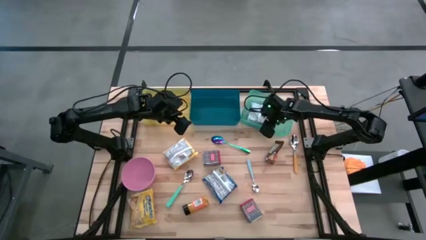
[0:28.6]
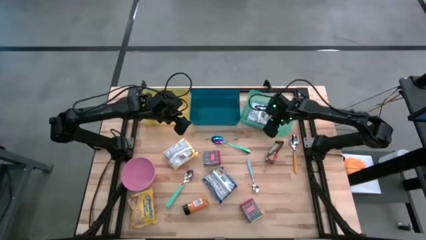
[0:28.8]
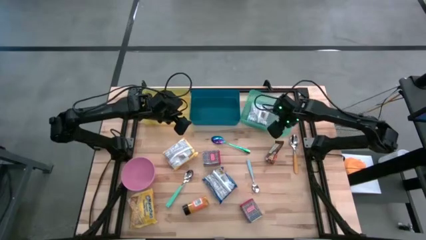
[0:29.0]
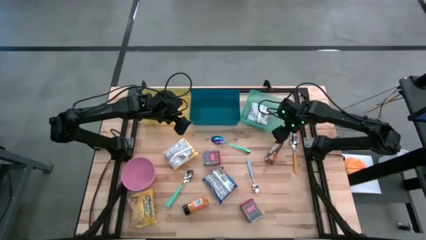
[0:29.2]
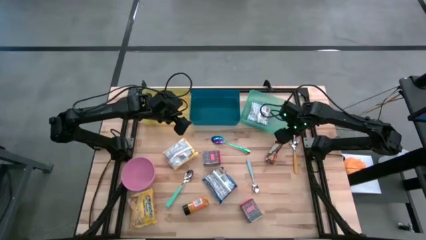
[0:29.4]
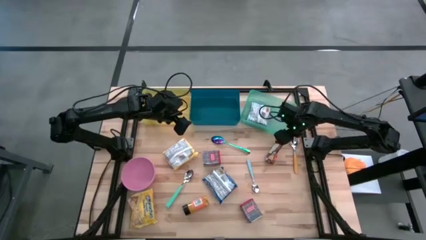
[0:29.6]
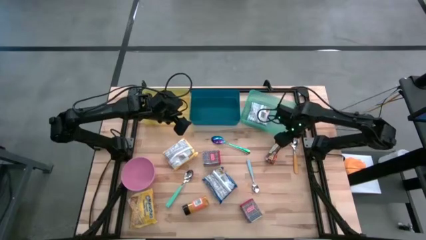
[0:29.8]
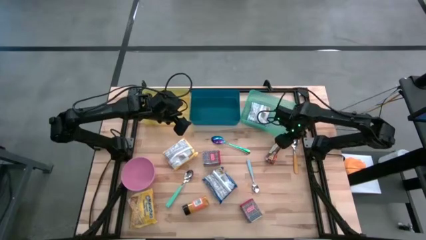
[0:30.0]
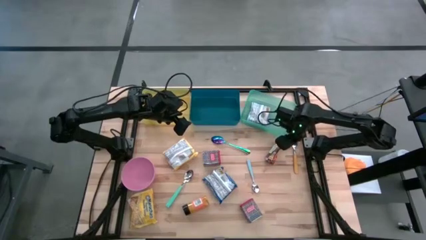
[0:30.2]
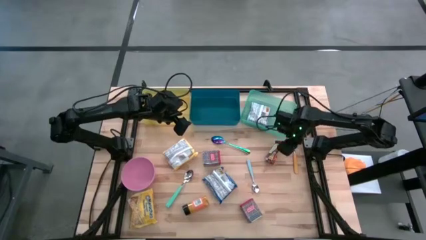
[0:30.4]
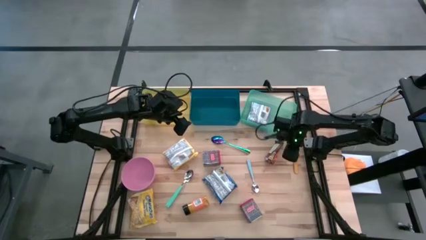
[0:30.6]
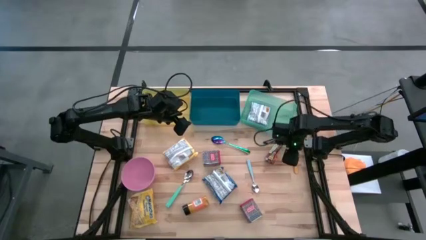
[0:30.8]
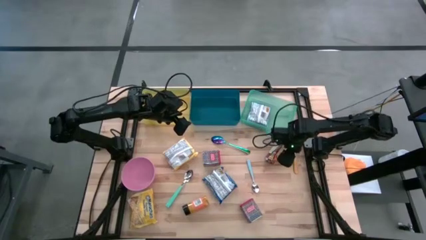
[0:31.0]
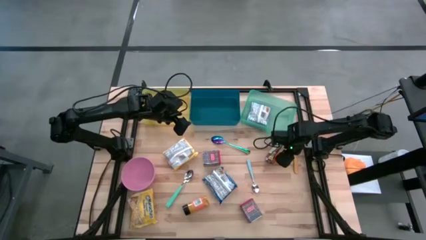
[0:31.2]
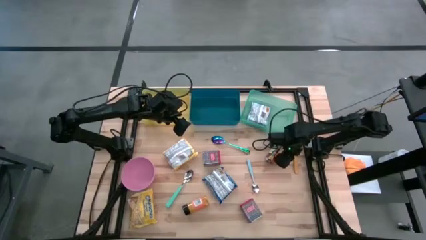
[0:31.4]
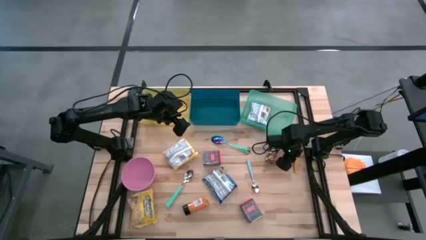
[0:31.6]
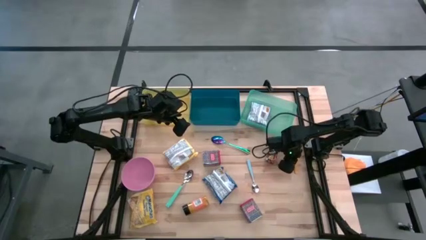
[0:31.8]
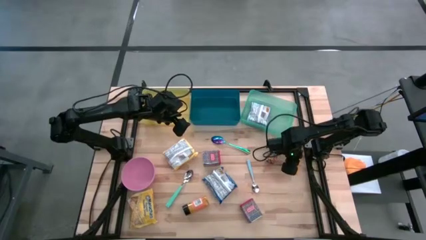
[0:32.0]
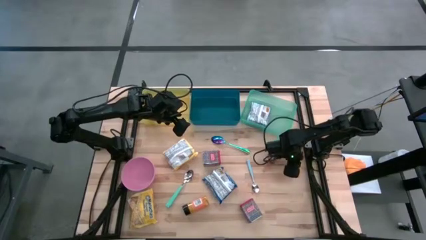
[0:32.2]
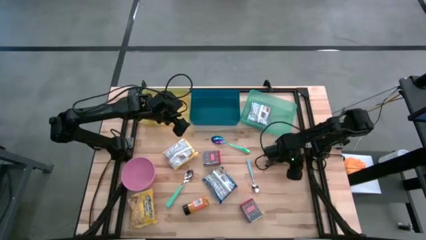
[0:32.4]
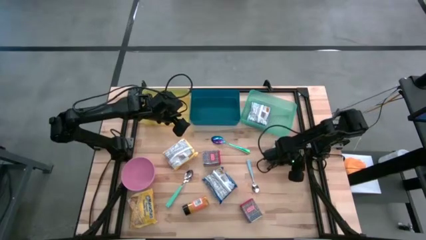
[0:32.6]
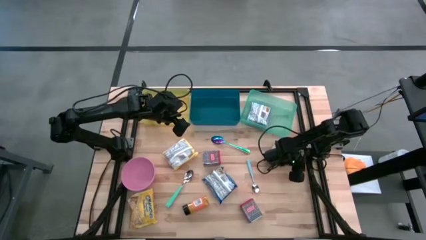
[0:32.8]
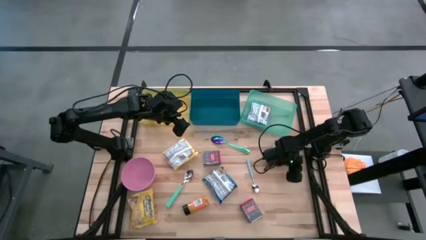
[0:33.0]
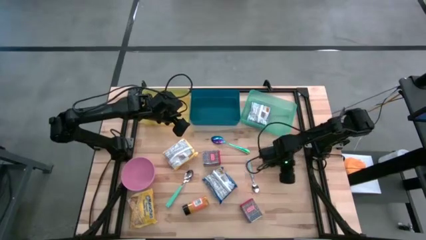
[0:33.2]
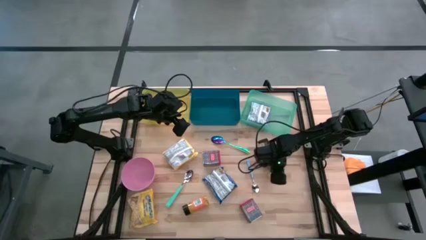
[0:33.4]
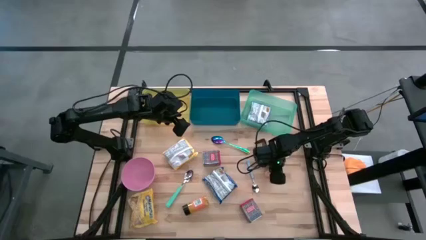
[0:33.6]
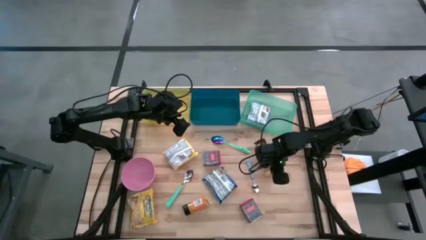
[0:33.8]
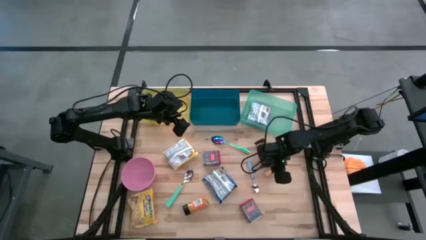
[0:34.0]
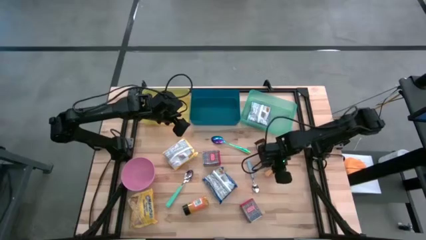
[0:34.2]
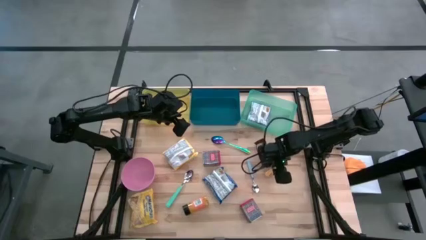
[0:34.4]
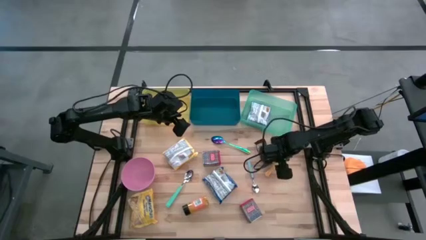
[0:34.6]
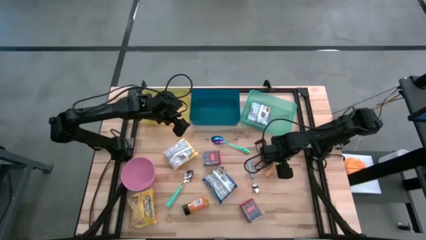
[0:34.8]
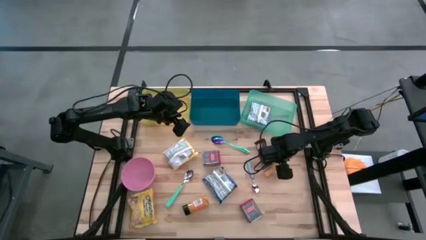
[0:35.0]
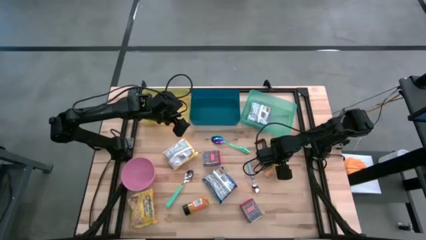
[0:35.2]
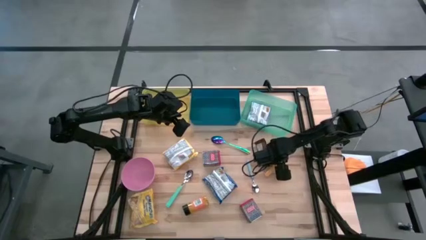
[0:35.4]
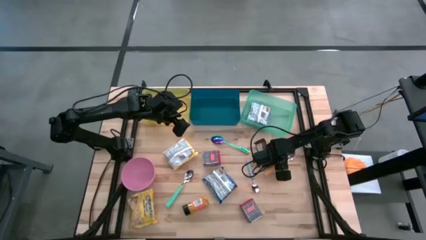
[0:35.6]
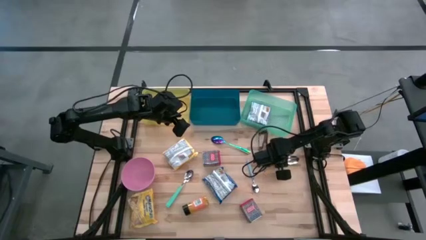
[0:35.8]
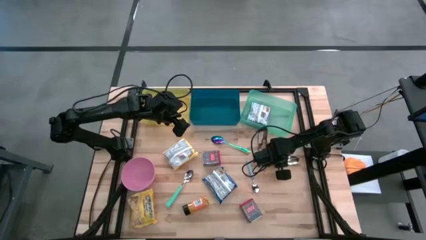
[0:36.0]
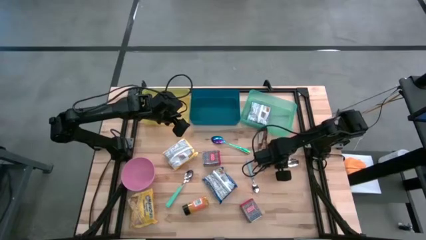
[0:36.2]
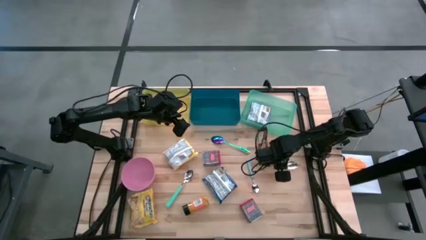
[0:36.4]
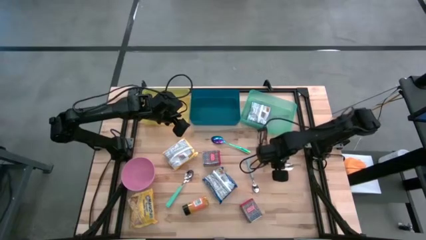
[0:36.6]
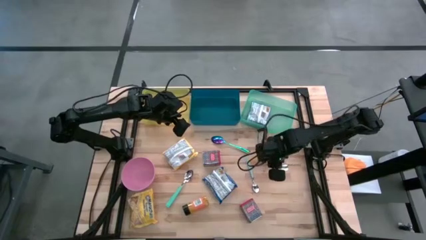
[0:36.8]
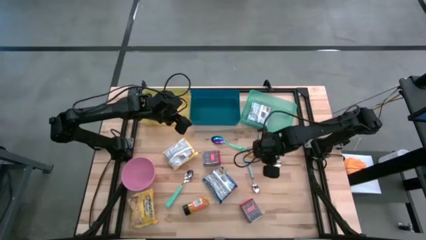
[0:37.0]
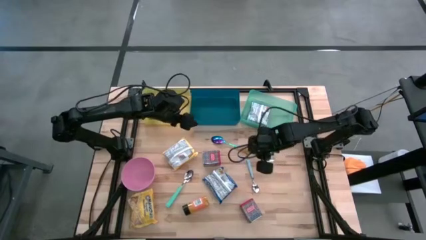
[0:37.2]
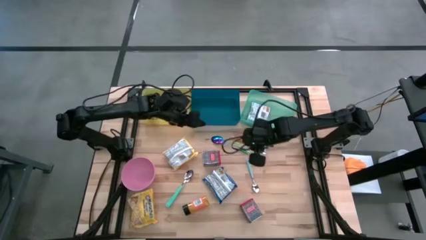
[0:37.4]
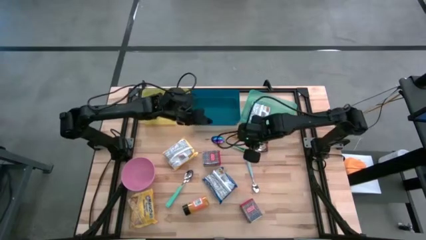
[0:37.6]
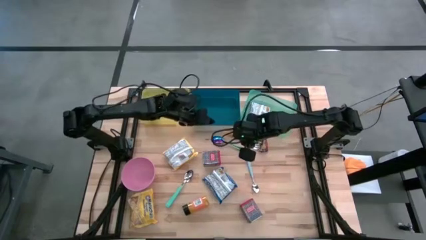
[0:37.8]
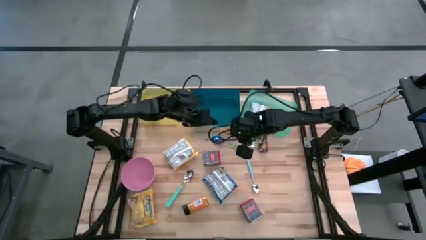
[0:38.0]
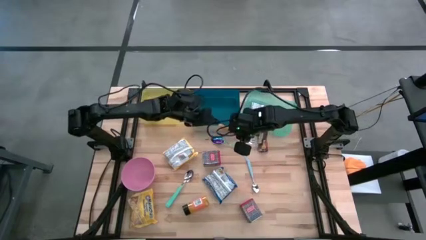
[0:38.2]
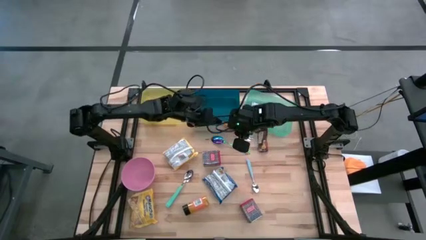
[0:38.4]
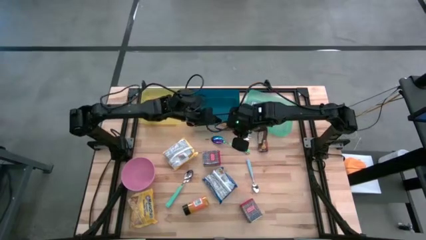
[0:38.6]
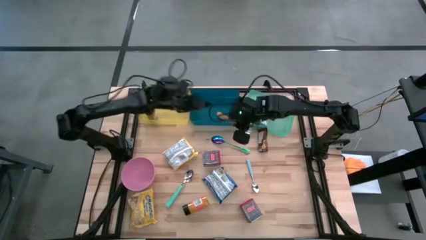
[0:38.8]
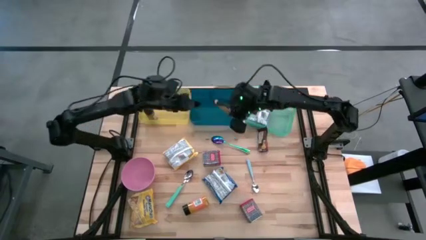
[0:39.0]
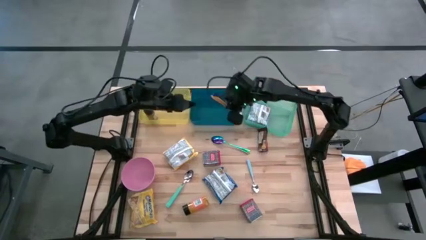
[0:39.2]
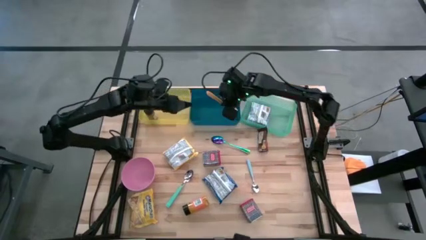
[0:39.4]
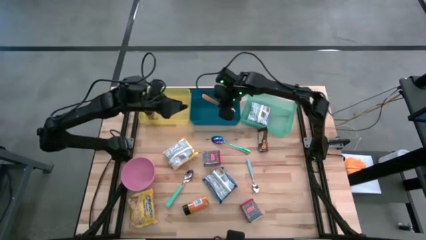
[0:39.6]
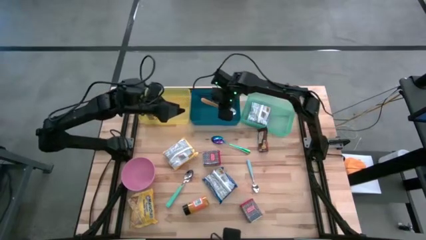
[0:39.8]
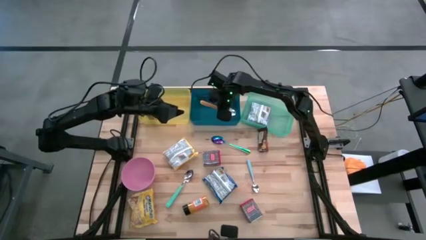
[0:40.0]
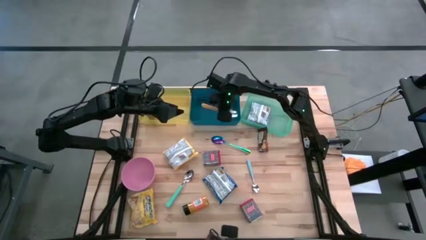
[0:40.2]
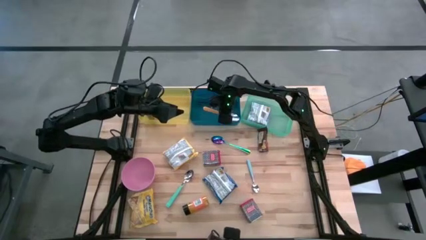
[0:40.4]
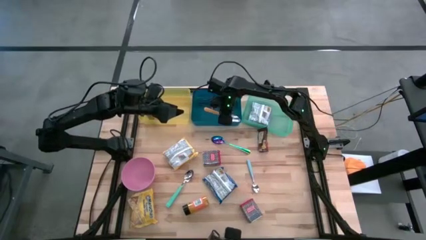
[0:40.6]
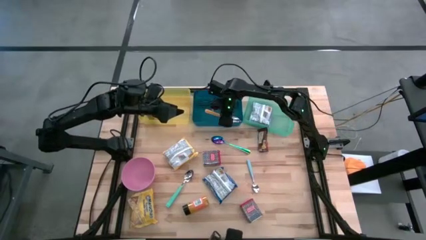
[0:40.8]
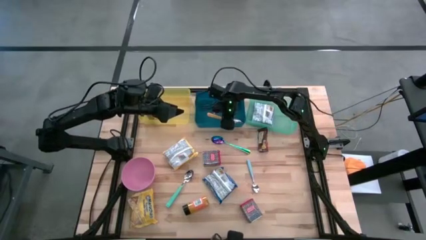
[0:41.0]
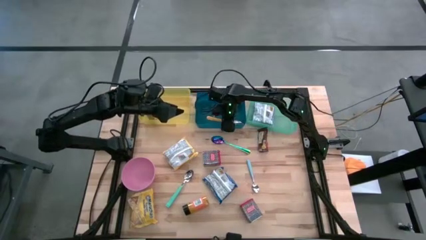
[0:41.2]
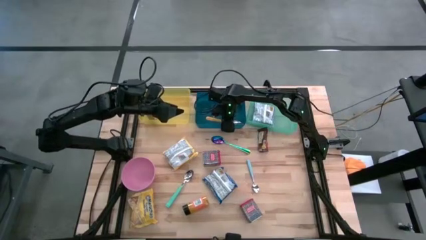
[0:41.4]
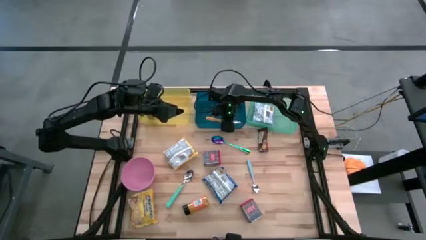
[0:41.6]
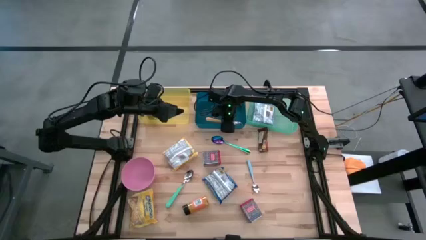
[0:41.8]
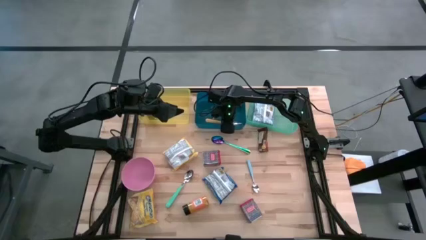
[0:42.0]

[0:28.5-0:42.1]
Put the yellow spoon into the blue bin

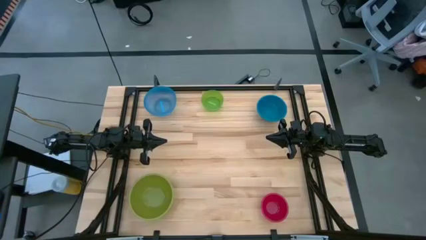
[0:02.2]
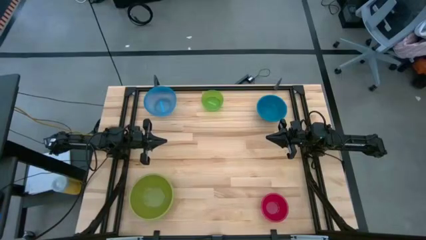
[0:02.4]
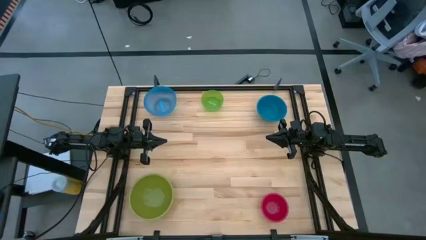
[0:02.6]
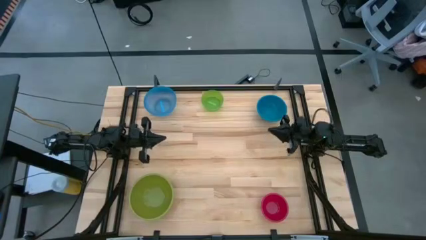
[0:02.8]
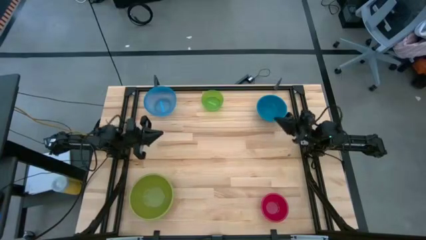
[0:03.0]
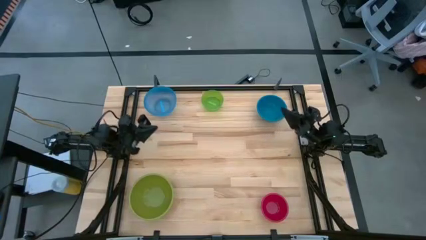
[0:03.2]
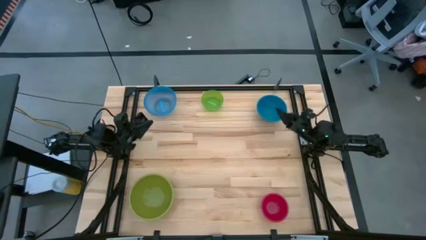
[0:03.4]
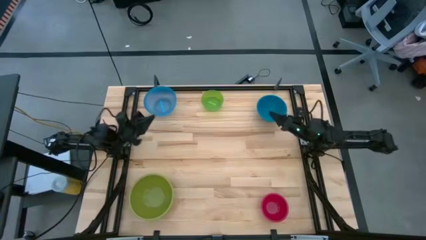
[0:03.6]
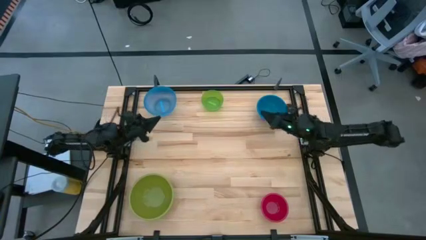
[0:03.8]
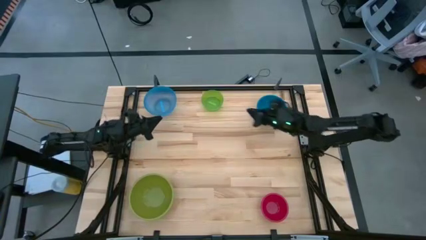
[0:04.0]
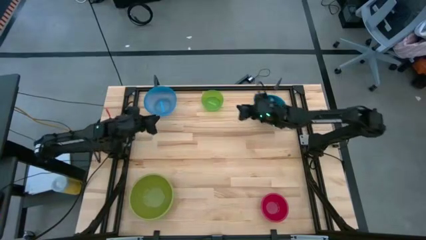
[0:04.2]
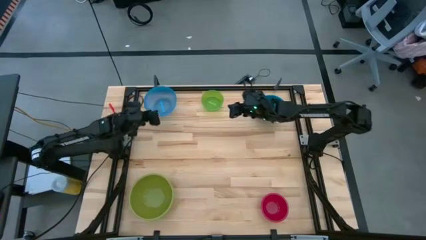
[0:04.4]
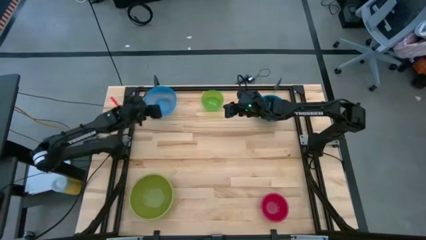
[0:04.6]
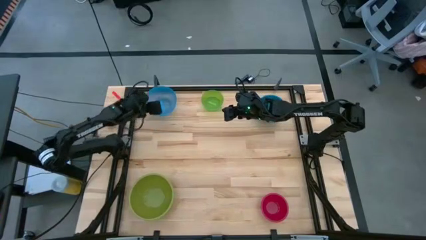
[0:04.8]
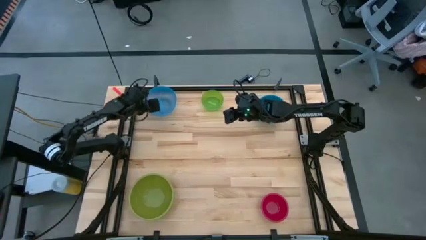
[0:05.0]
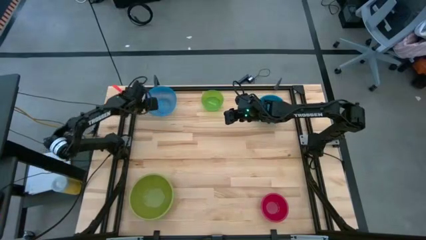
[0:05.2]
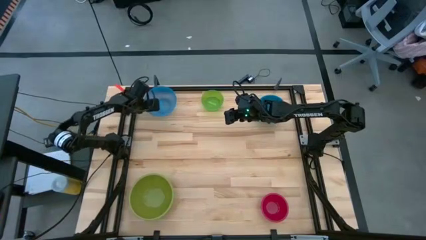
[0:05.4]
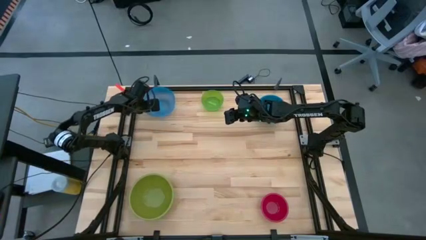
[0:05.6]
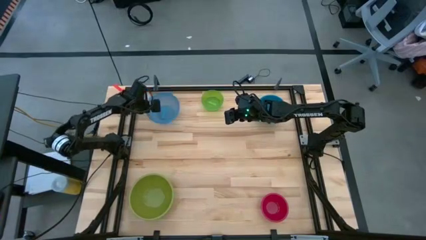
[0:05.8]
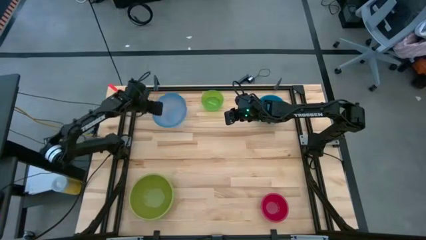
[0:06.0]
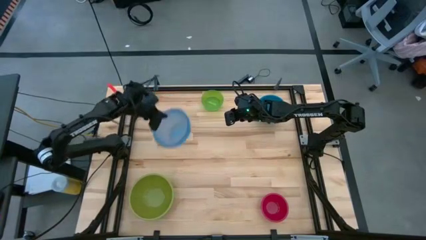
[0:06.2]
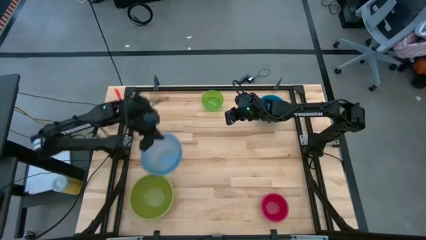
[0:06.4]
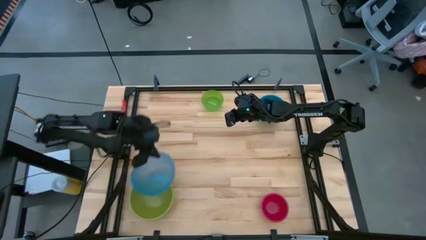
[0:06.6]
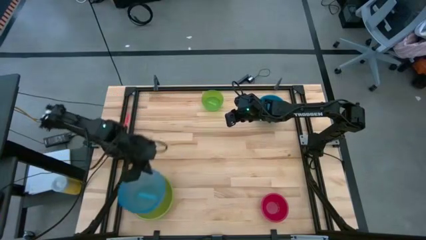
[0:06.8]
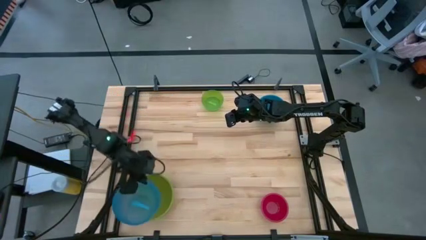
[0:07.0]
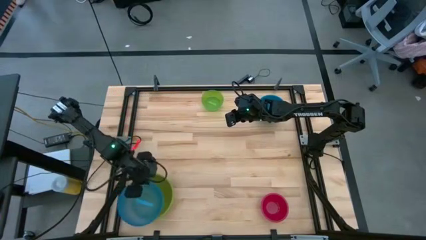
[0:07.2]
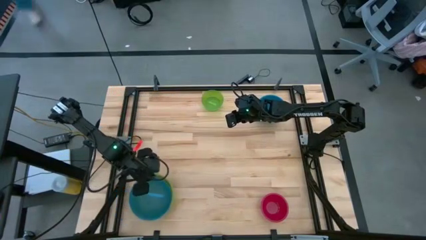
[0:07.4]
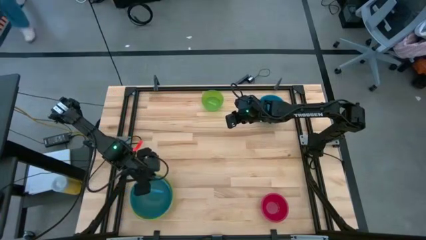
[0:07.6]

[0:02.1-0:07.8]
Stack the light blue bowl on top of the the bottom green bowl
